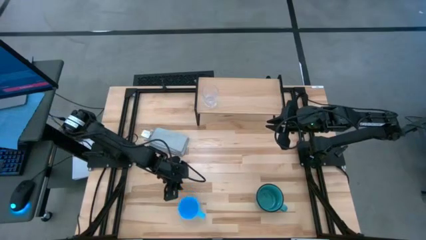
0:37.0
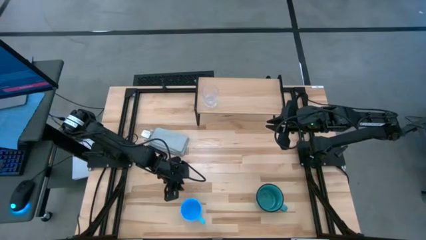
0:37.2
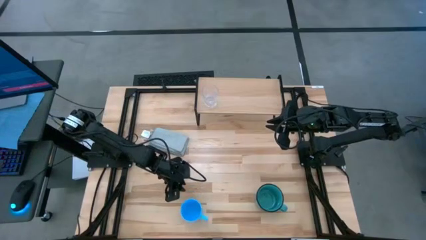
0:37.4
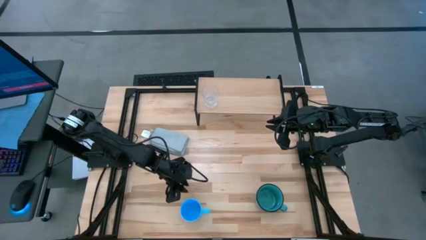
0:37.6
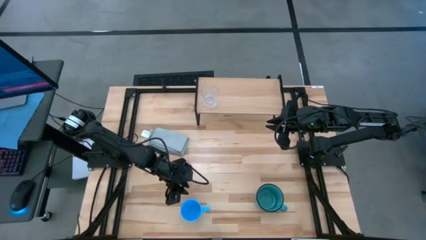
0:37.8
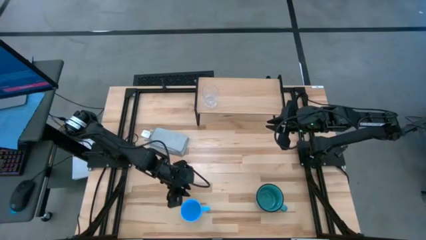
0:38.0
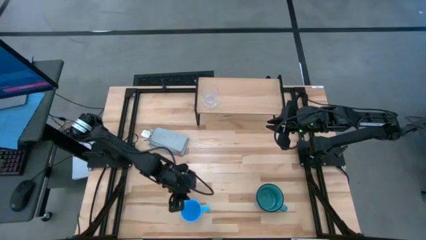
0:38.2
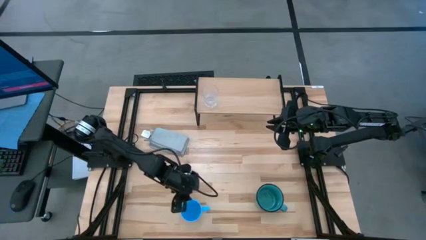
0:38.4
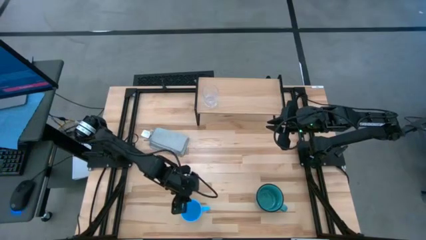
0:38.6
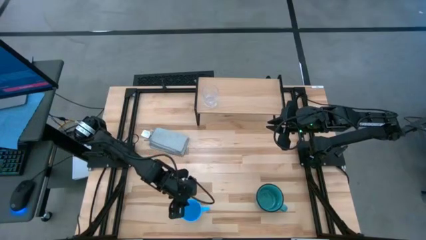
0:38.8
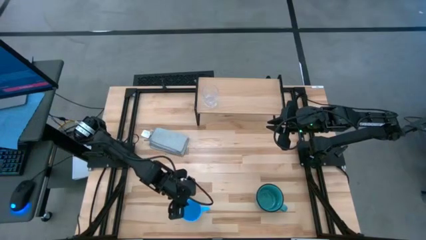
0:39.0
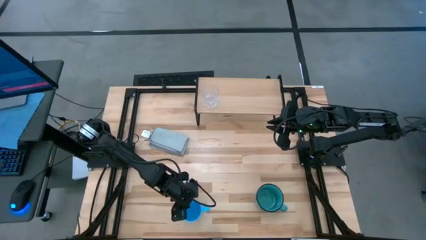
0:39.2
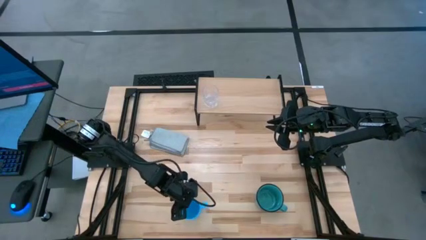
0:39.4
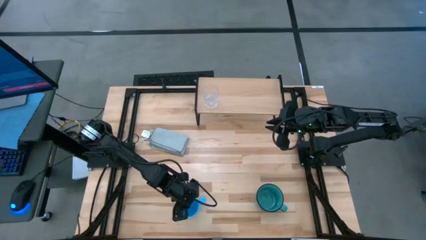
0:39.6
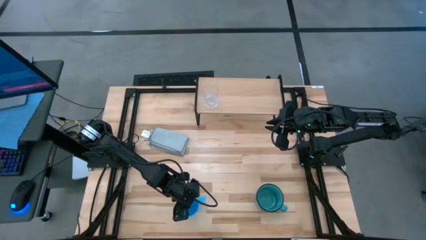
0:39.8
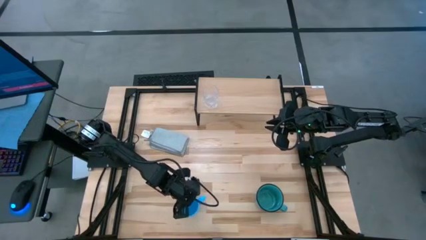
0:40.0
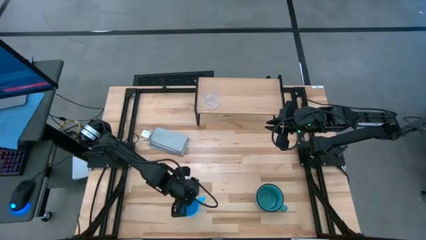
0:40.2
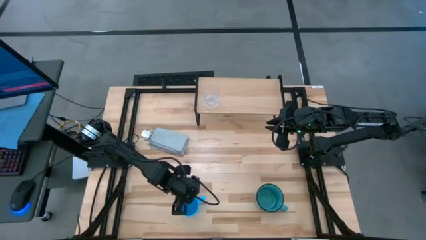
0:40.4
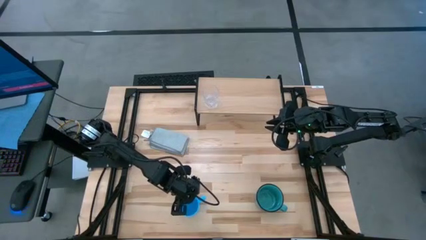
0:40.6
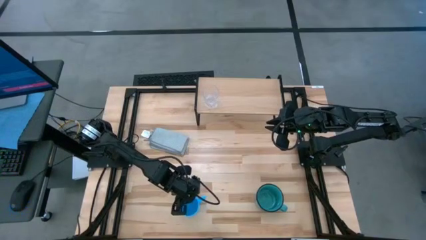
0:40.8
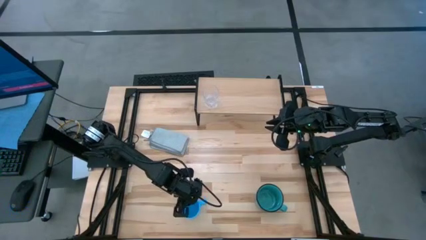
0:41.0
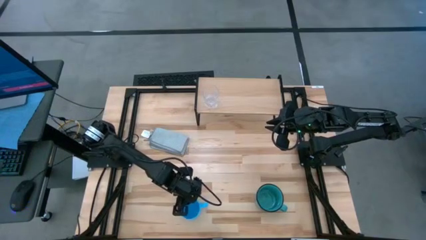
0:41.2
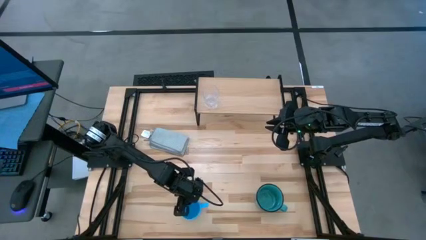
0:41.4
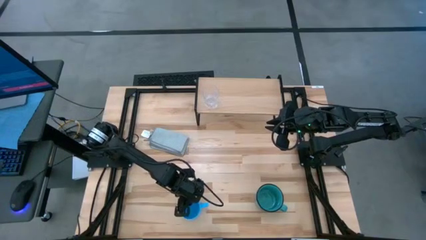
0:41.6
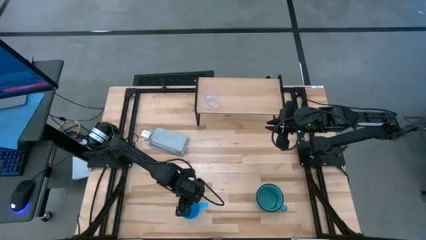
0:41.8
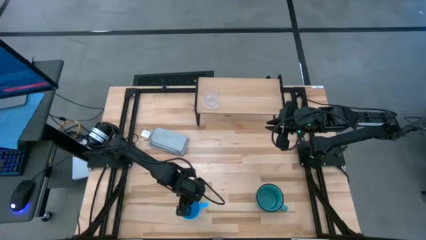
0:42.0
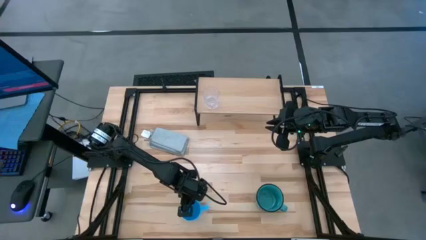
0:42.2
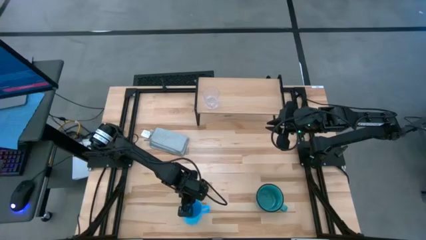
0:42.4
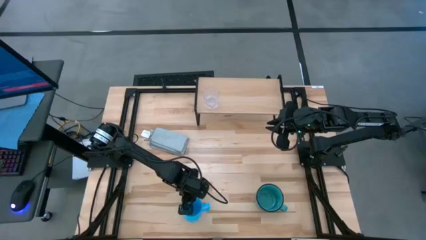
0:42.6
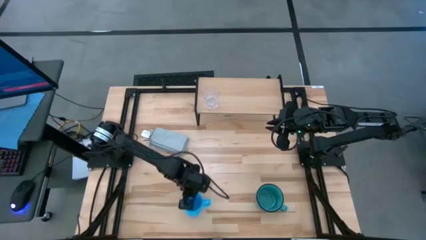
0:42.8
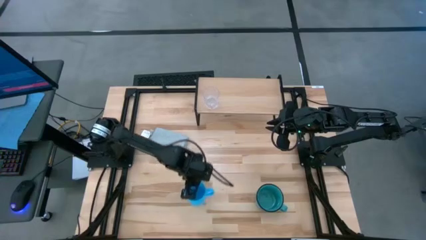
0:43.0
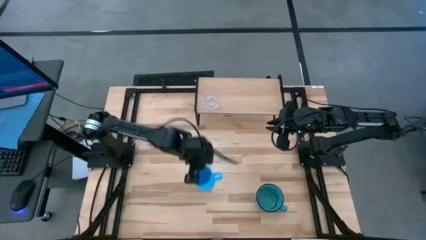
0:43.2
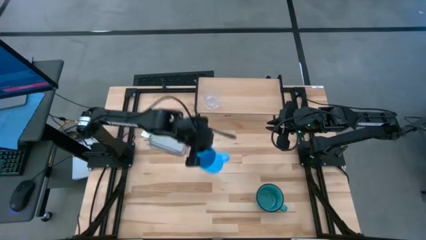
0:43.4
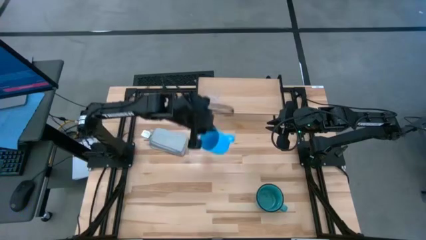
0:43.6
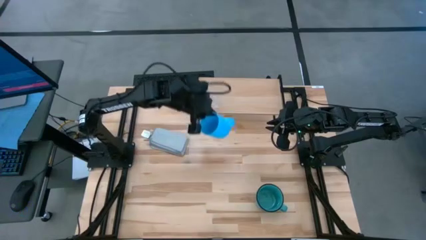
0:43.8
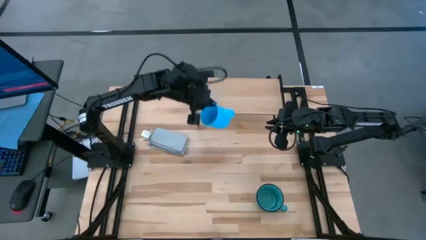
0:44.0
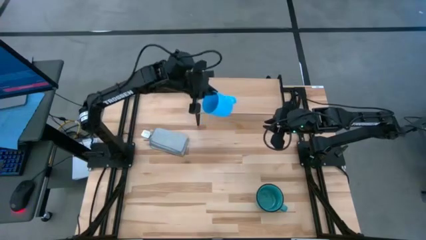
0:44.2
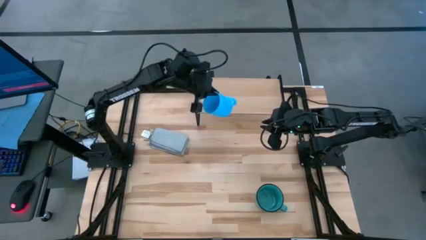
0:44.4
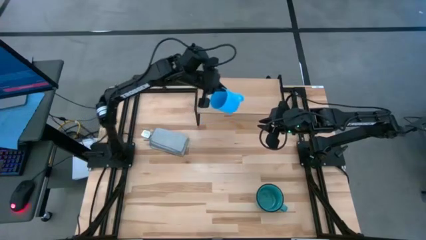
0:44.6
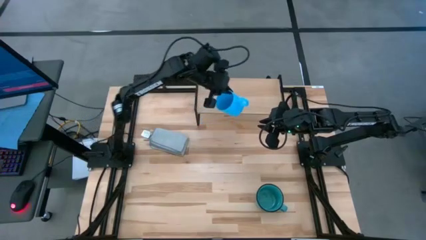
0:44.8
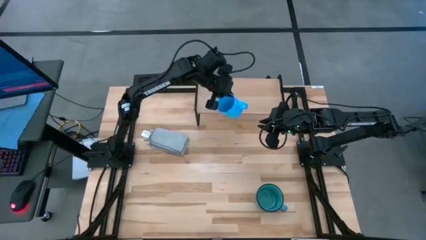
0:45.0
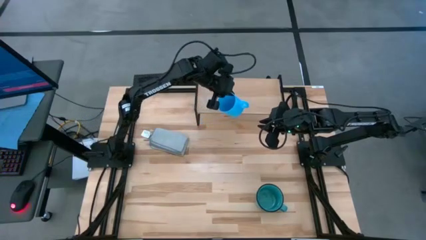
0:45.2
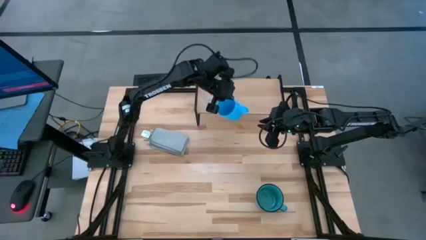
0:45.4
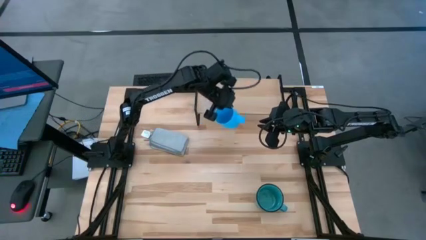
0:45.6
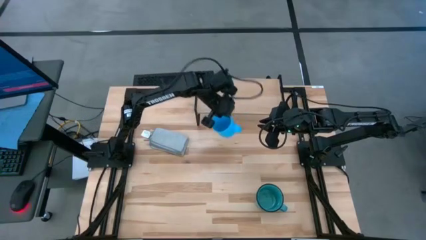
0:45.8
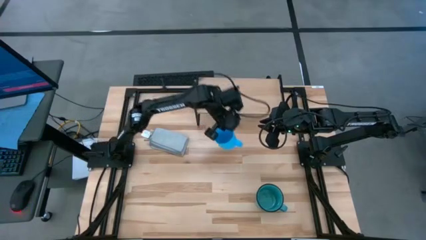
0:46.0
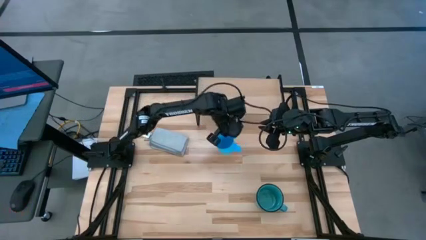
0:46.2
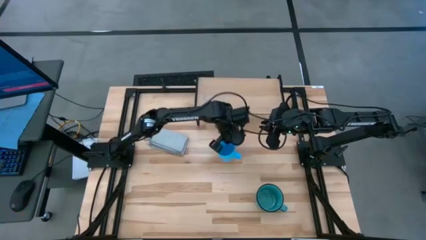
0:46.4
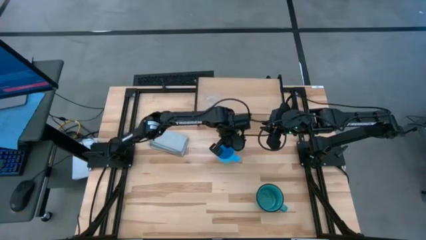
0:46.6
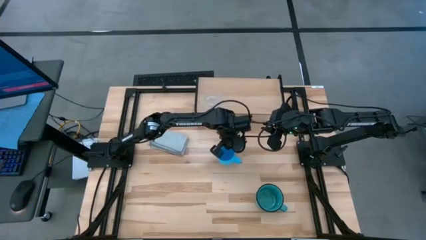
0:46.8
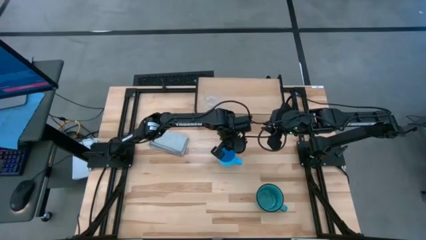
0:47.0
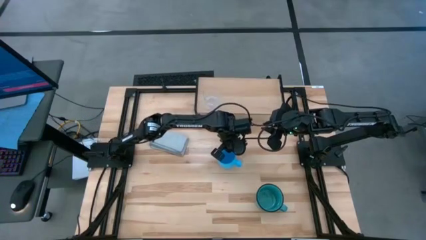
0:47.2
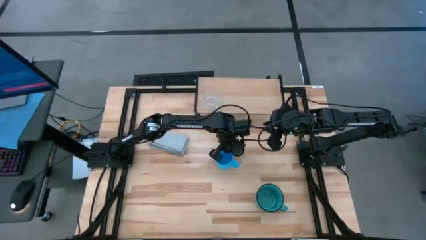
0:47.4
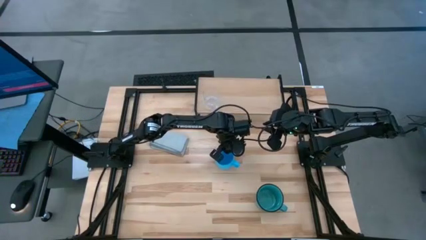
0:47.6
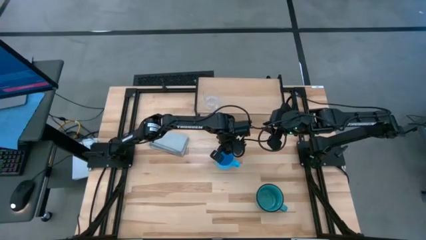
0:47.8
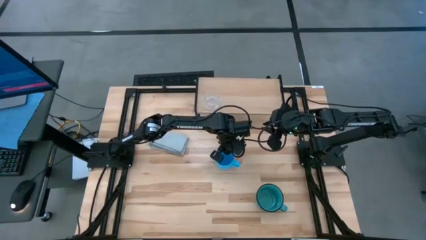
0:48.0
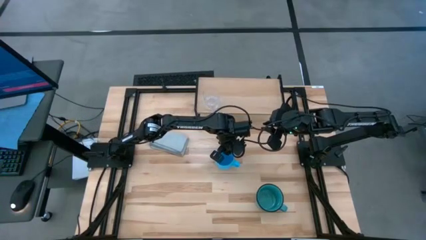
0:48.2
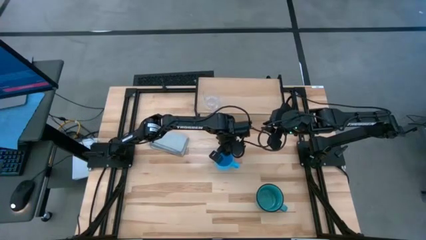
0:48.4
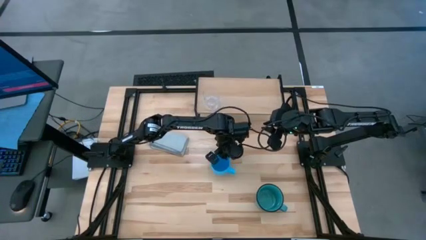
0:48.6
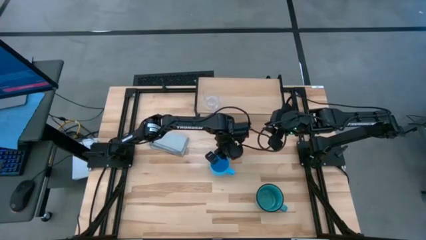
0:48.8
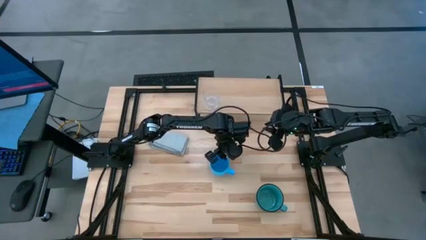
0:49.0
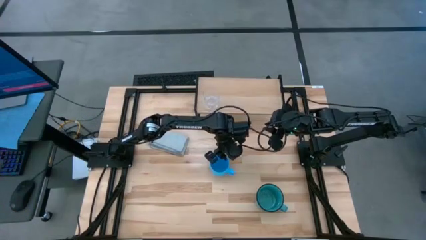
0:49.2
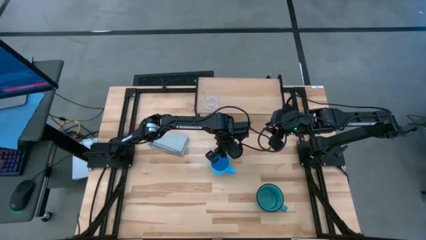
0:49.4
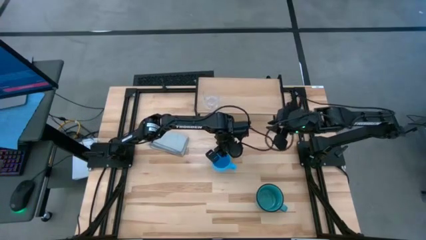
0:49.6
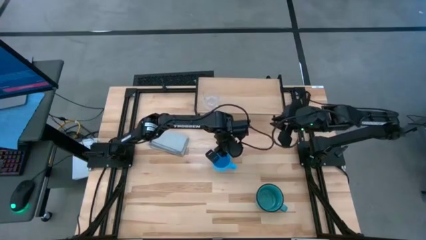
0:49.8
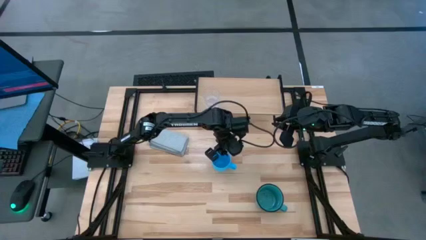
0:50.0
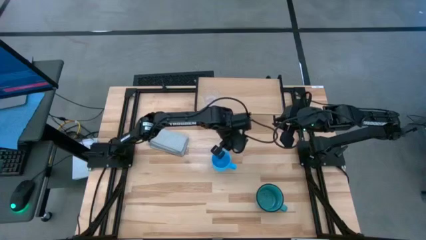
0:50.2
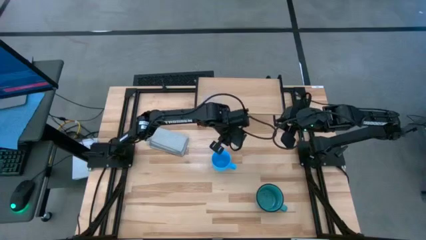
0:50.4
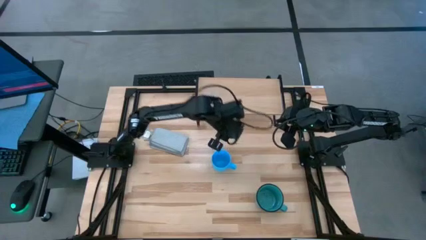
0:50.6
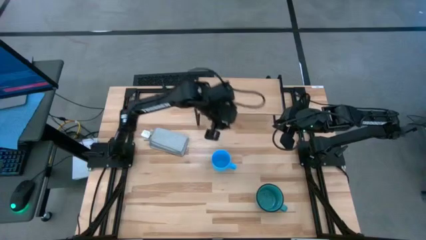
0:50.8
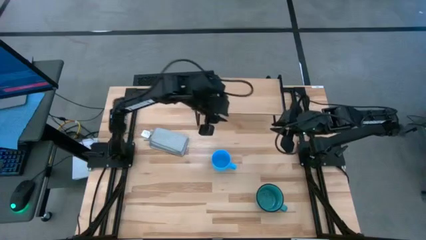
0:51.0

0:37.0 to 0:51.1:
Task: Stack small to large cups/mugs on shelf
Put the blue mug on the shelf

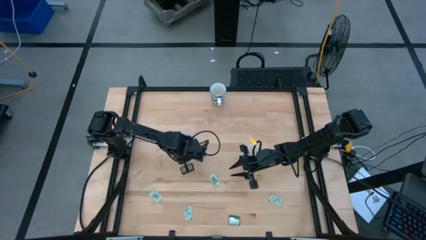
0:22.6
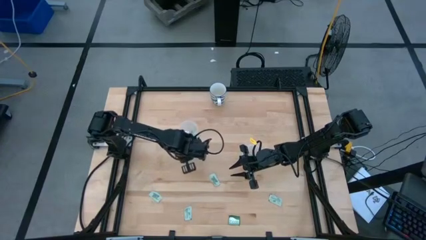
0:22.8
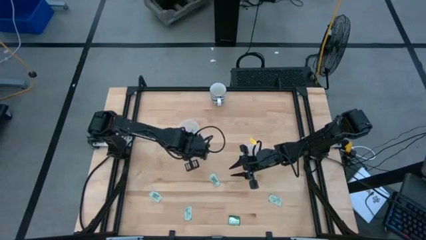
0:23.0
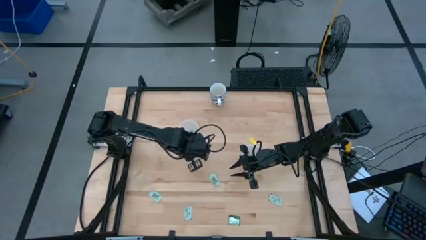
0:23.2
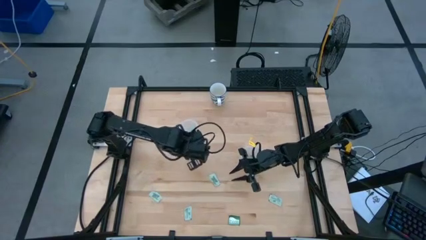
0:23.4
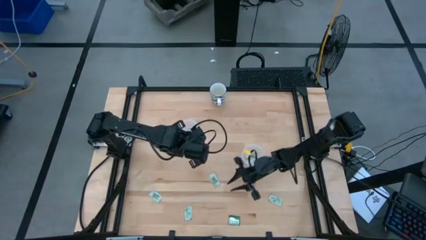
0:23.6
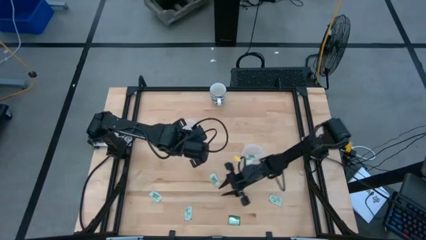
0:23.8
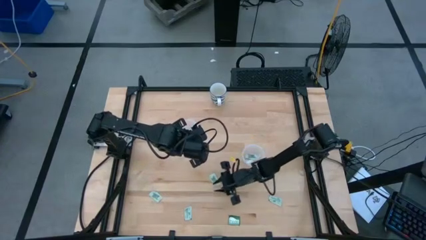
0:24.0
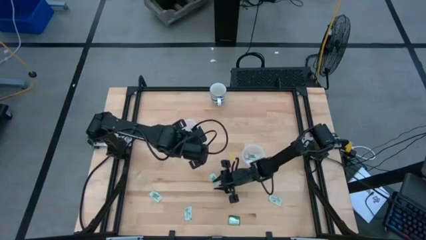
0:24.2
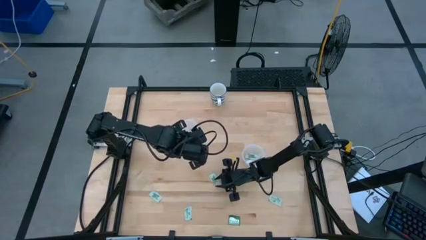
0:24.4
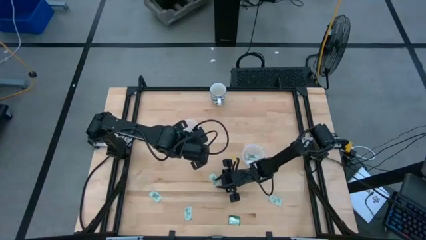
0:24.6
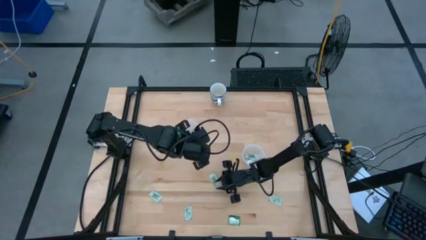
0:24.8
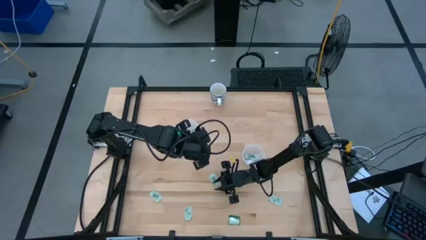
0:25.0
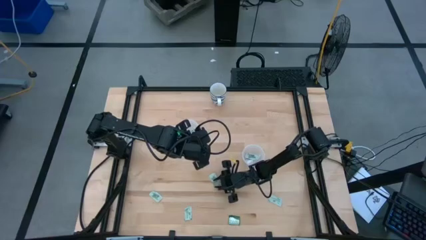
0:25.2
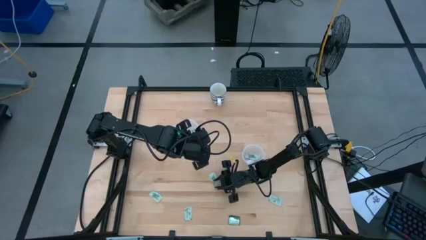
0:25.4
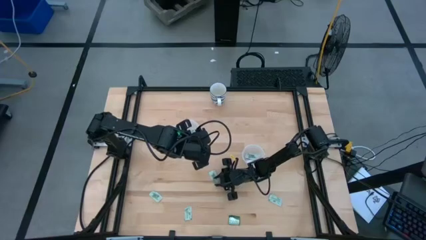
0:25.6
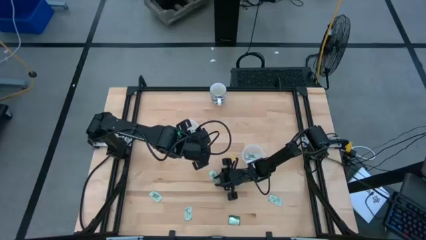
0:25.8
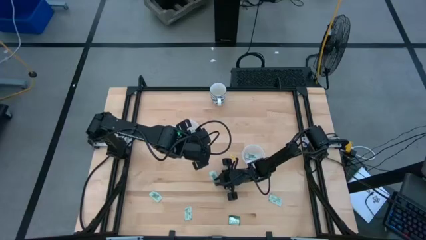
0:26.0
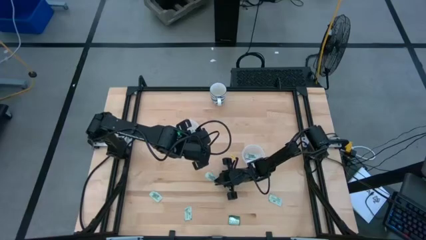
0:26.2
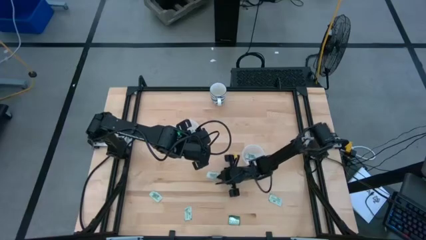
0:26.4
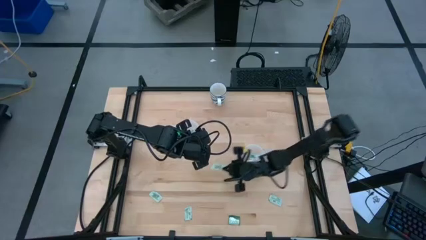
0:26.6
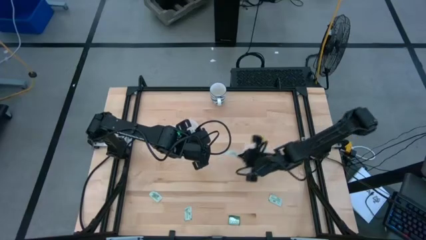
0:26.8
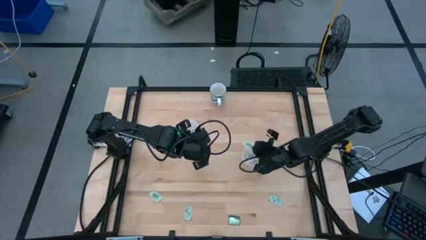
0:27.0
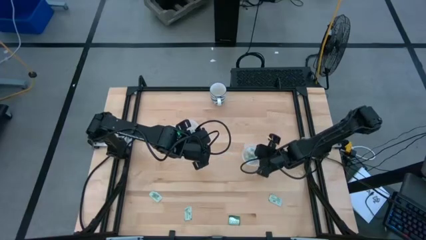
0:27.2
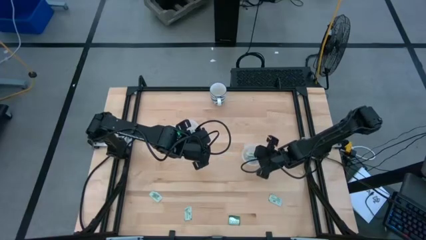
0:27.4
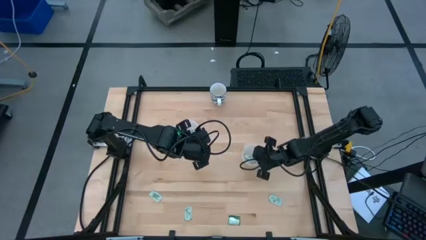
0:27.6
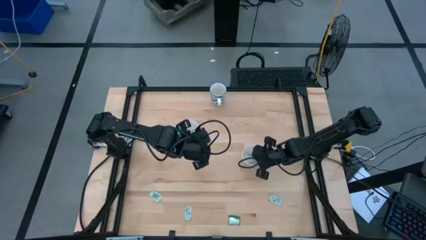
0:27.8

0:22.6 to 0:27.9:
Task: Pick and place Stevia / Truvia into bins
Put the light green stevia packet into the right transparent container
